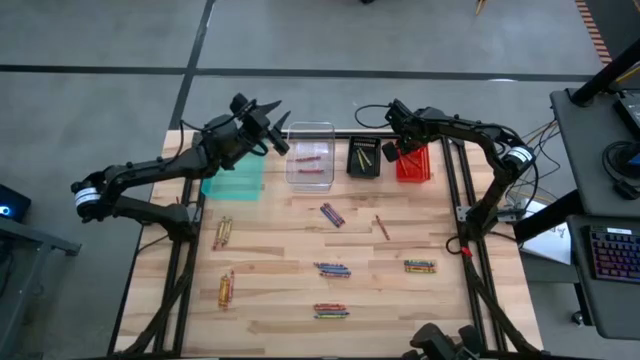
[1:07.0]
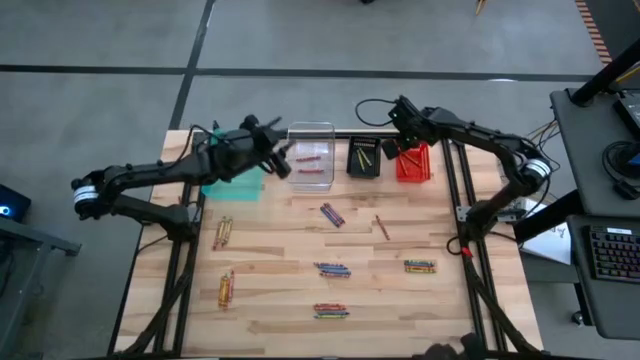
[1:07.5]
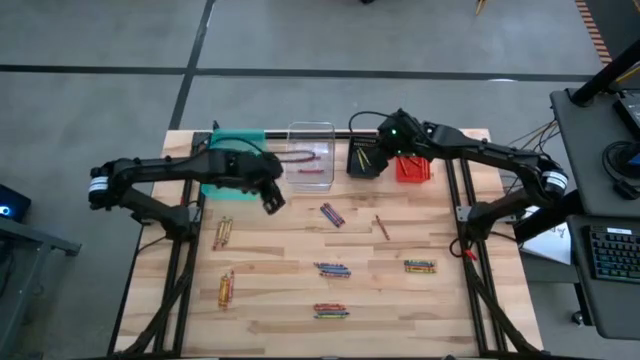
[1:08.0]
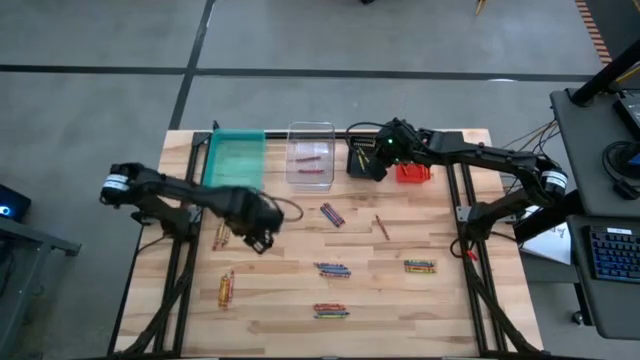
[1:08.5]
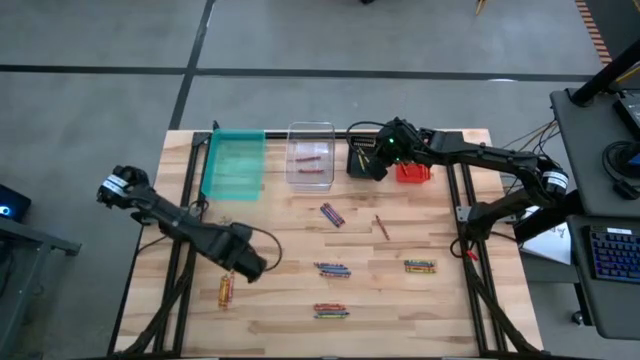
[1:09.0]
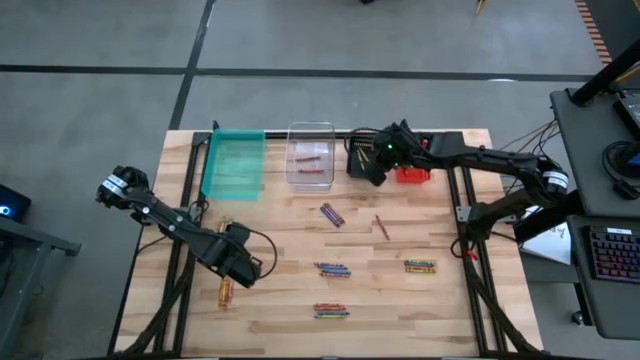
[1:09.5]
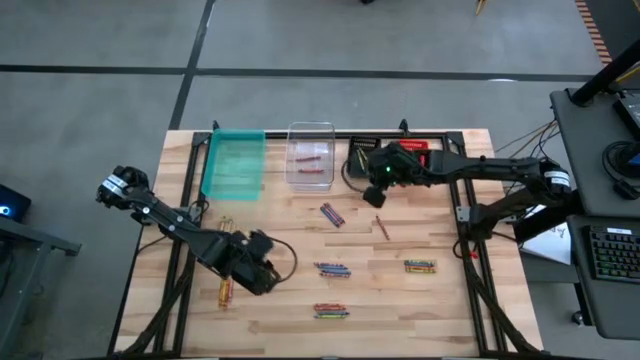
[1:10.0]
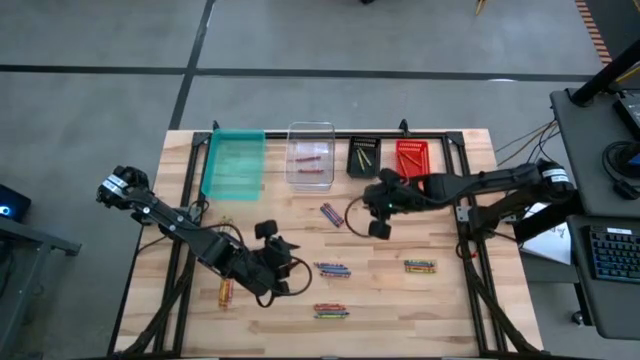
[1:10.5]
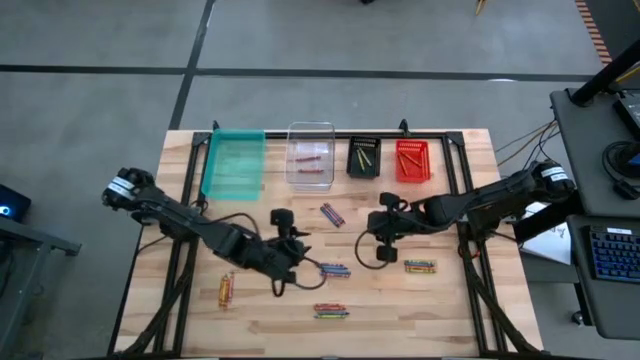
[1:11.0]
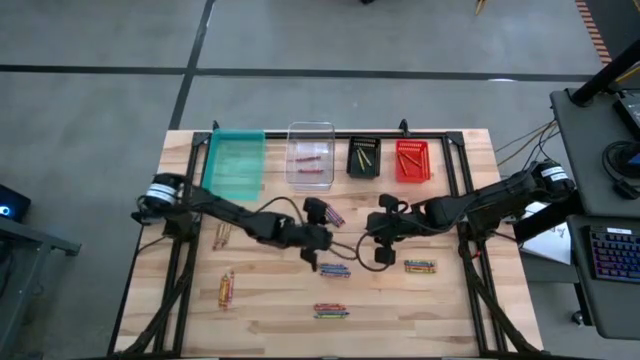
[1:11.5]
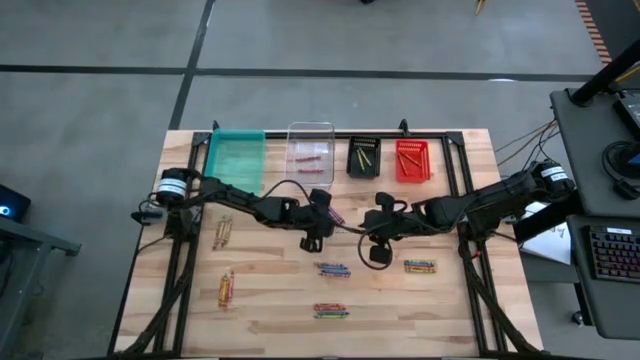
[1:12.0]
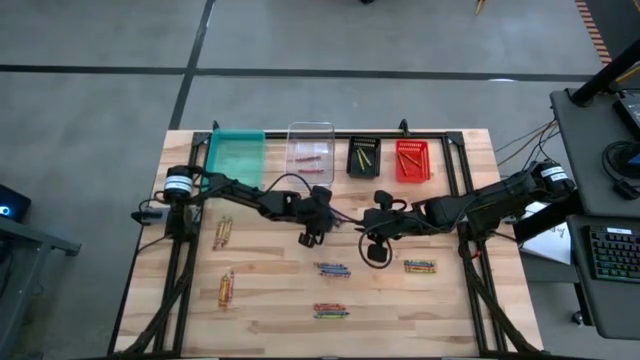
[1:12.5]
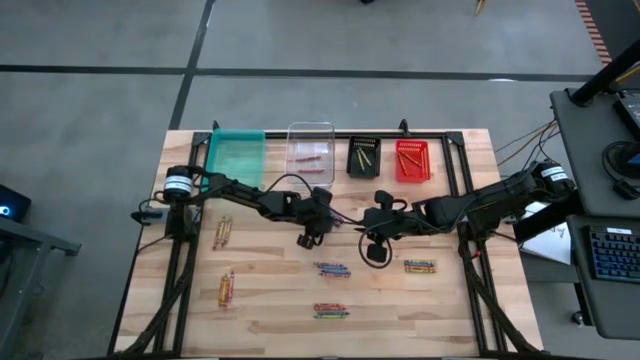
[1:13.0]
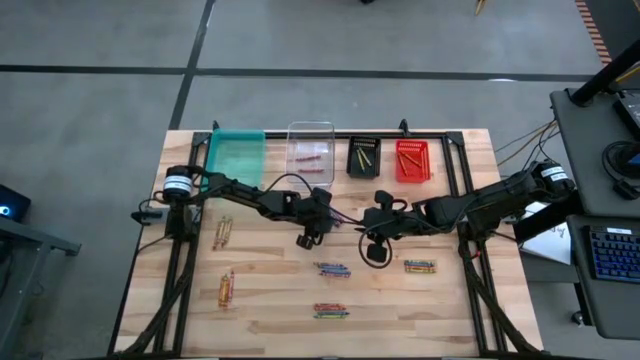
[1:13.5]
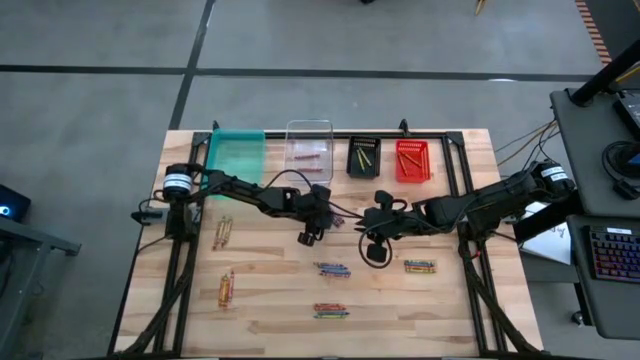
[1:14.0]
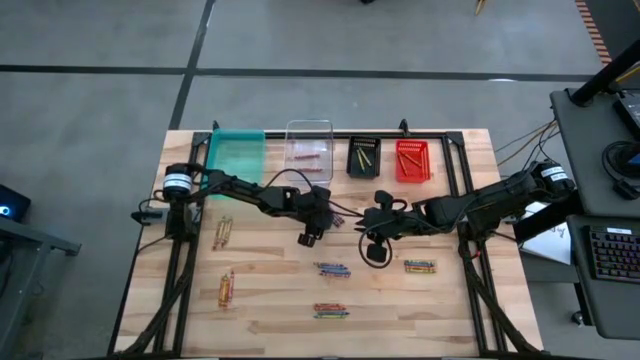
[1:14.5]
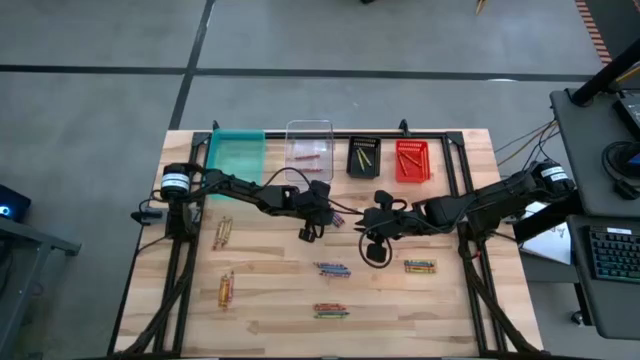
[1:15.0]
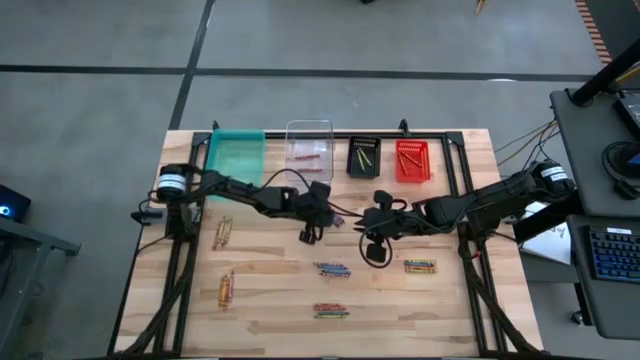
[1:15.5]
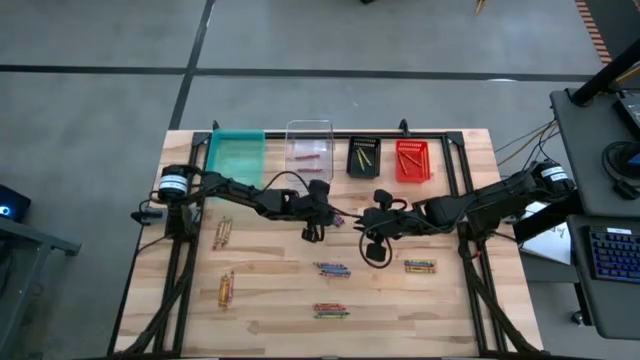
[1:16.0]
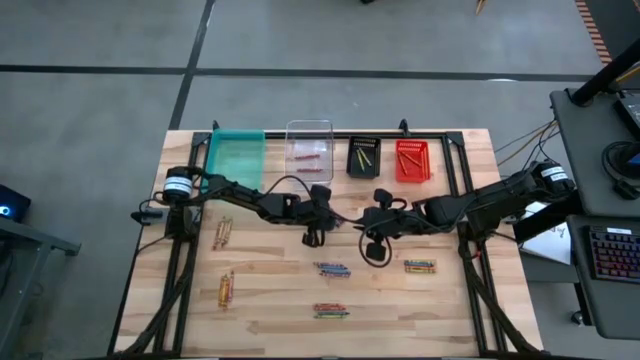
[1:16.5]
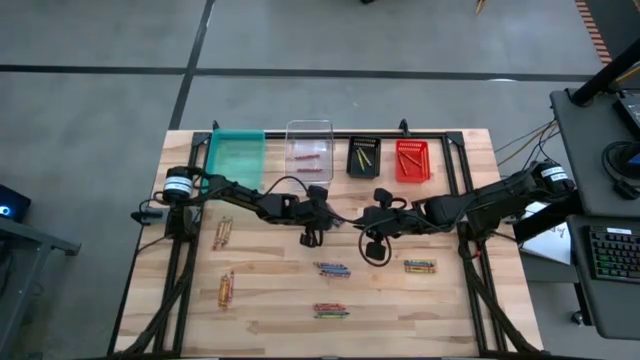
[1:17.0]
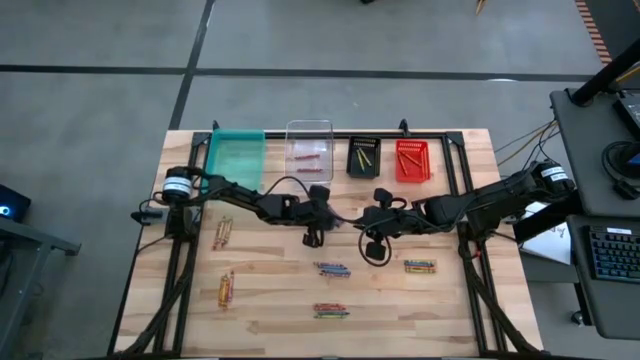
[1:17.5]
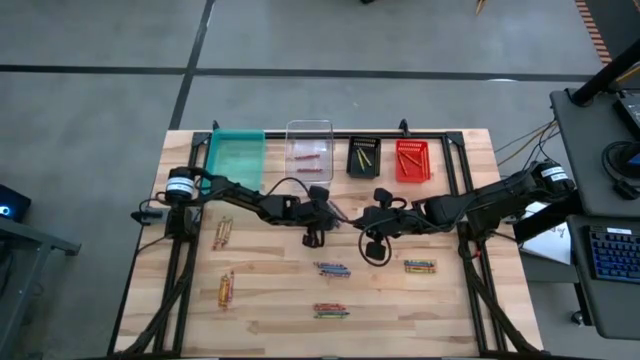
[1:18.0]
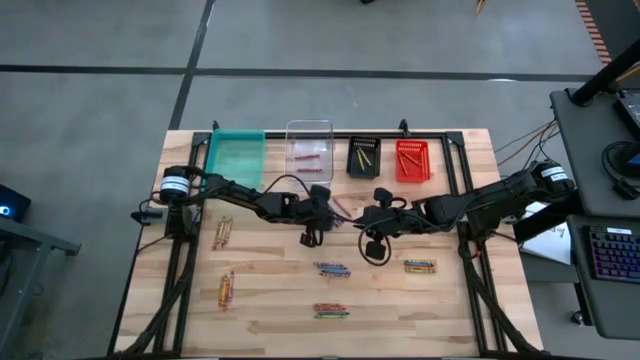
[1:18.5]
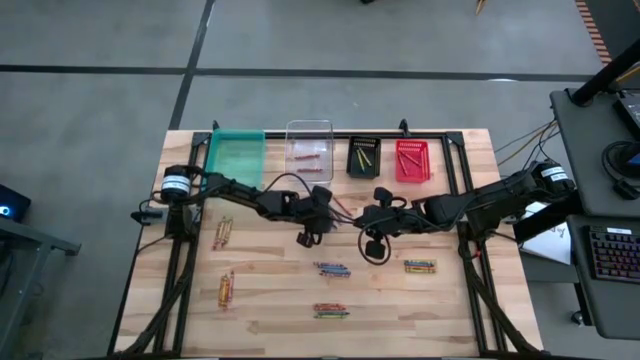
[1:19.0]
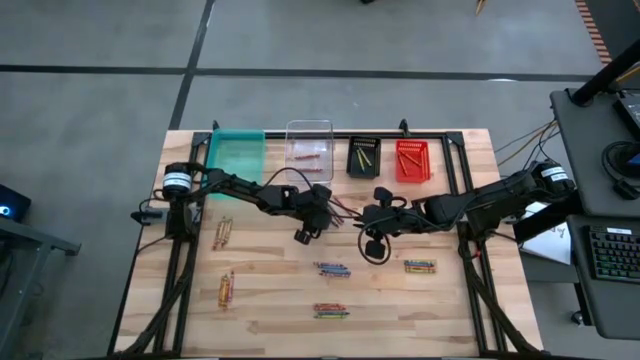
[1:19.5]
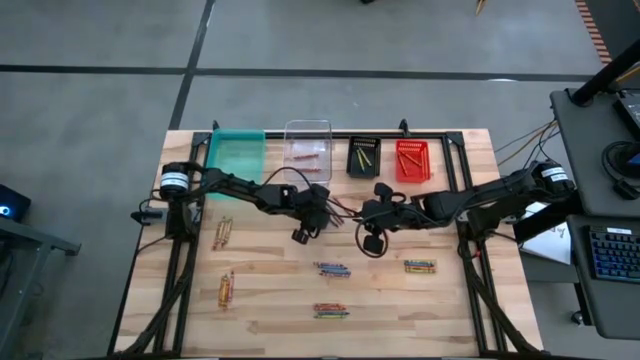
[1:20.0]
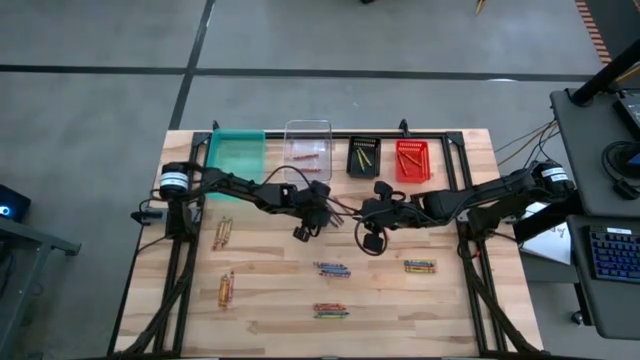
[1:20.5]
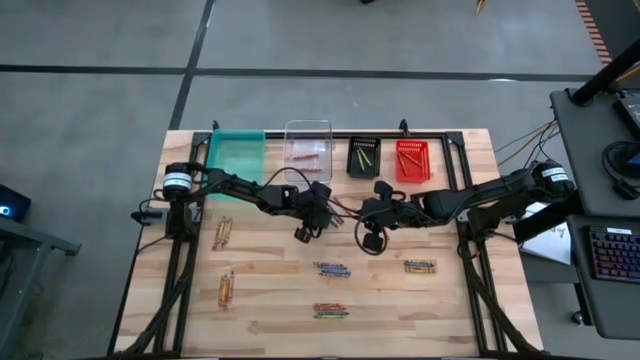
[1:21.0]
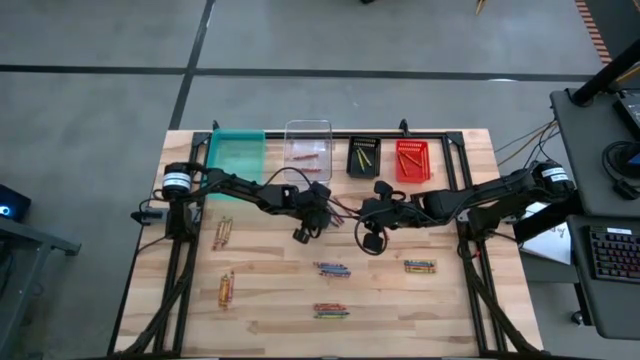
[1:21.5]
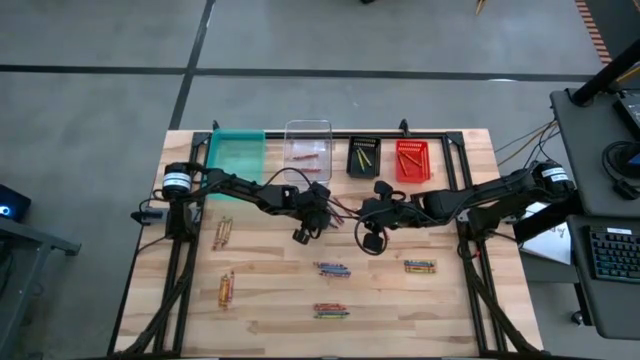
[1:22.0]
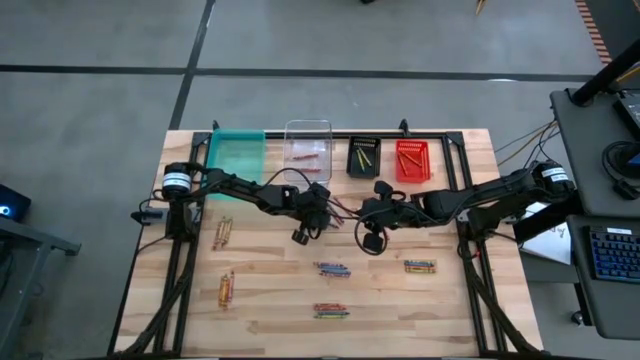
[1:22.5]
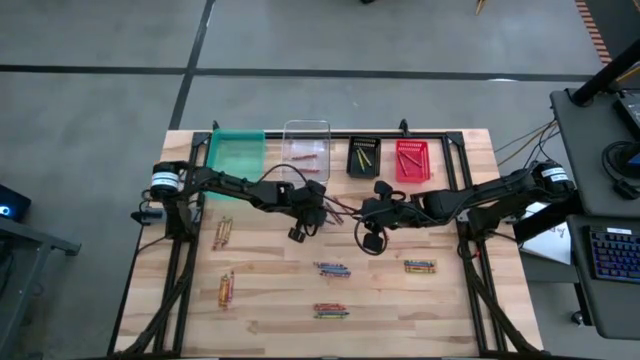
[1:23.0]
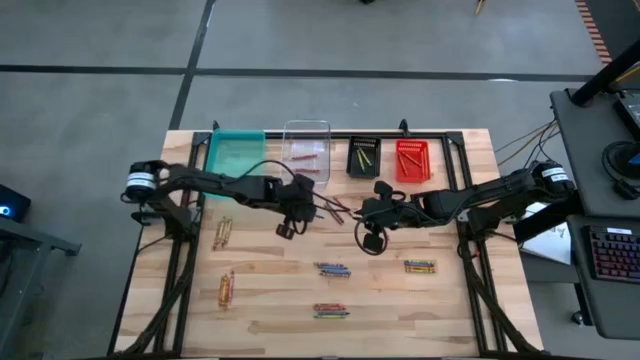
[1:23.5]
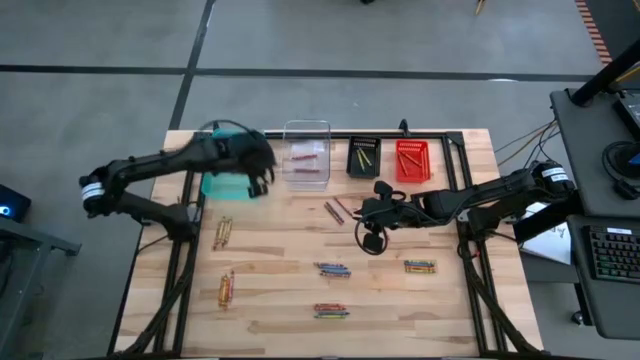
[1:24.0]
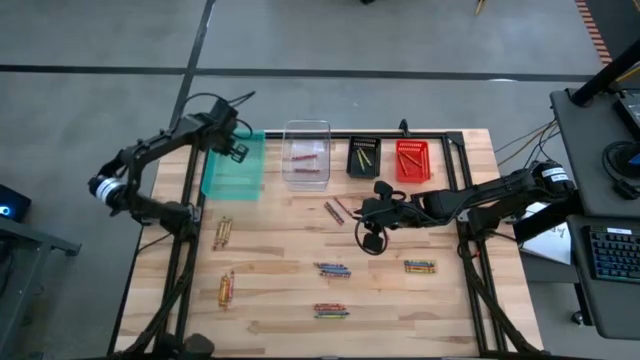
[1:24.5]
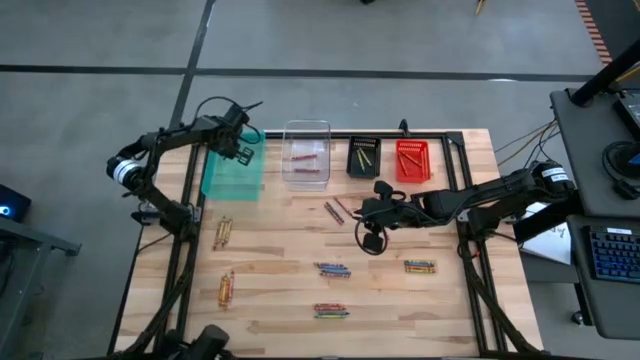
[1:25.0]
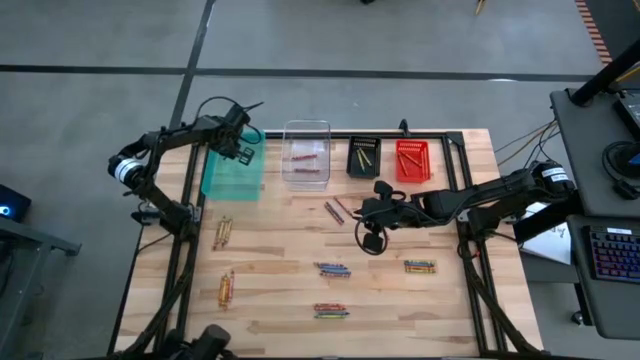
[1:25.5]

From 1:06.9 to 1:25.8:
Task: Sort crayons
Put the blue crayon into the green transparent bin

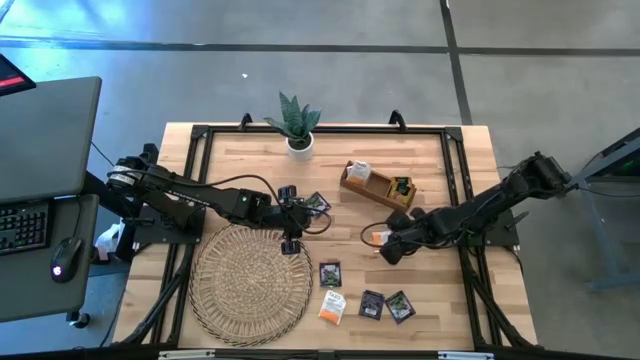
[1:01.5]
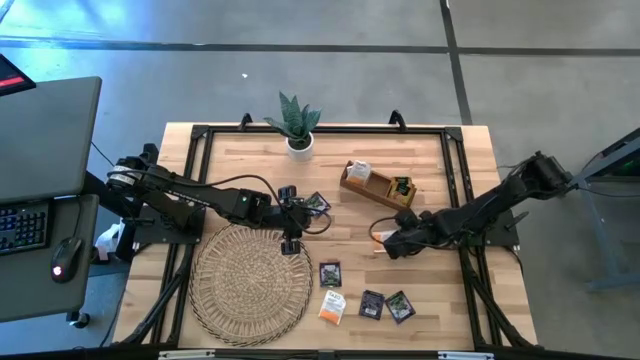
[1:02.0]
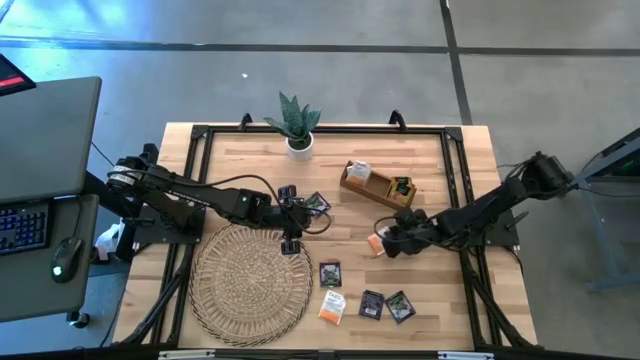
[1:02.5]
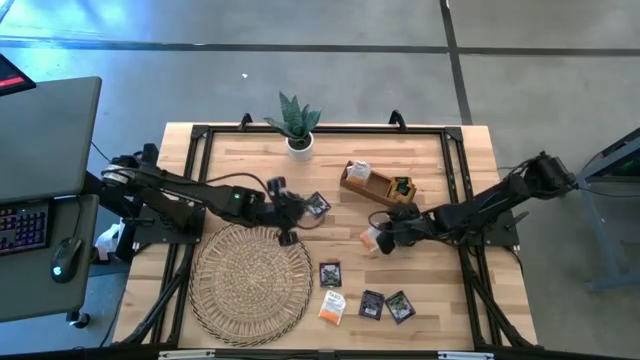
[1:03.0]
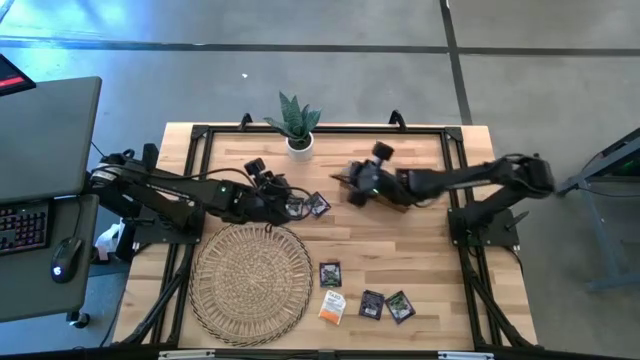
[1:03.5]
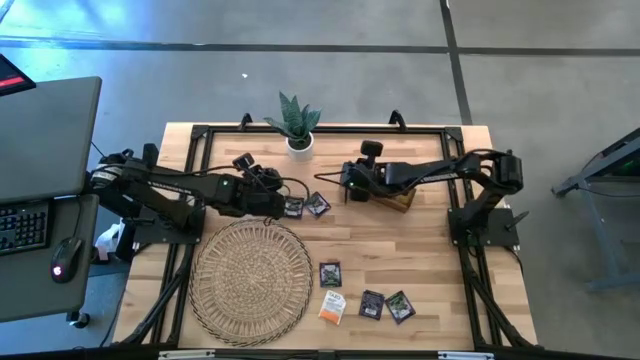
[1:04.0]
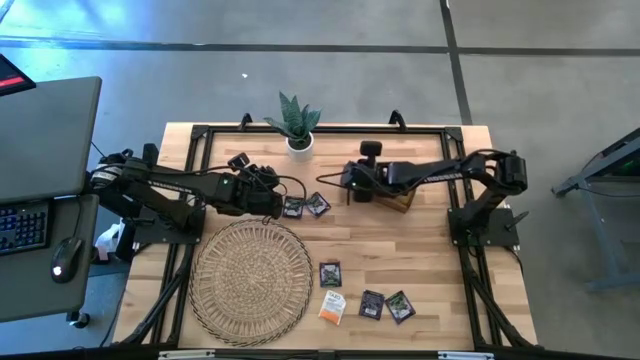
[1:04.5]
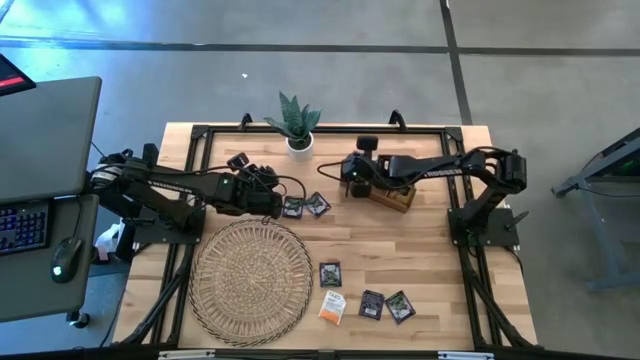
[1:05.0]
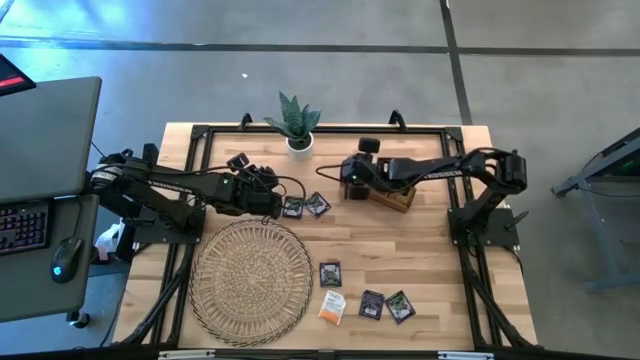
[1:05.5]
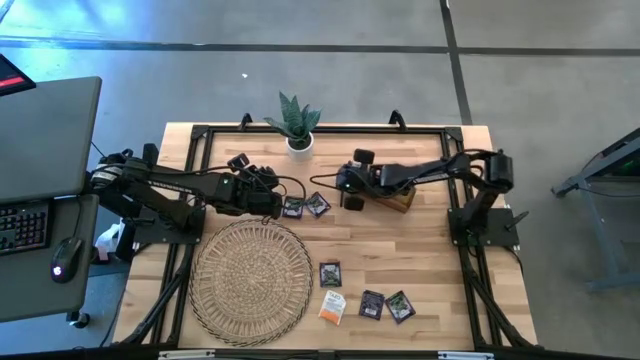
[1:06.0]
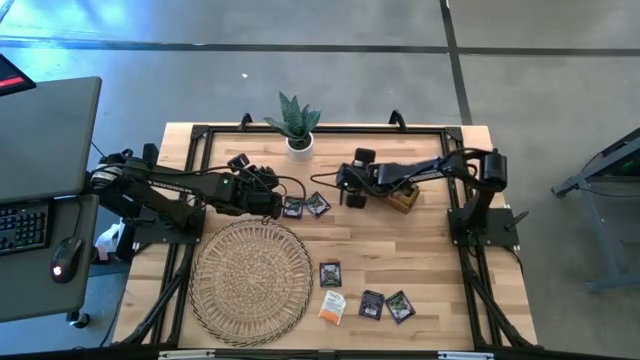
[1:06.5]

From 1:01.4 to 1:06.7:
Task: Pick & Place Tea
Put the white tea bag into the left section of the wooden organizer
